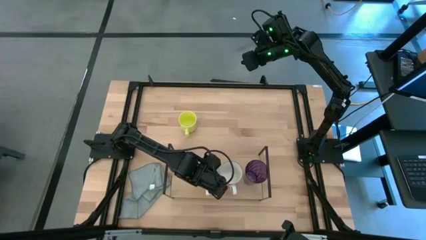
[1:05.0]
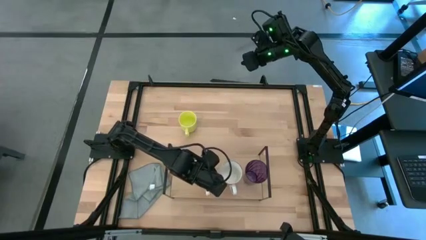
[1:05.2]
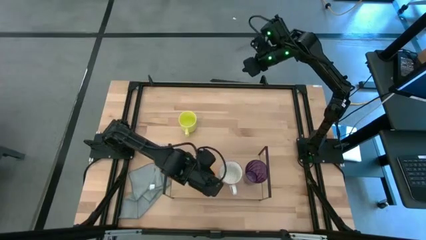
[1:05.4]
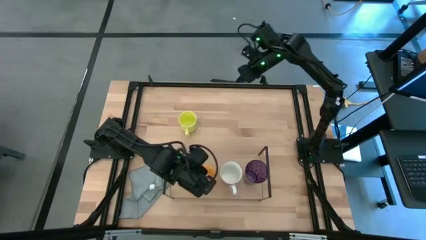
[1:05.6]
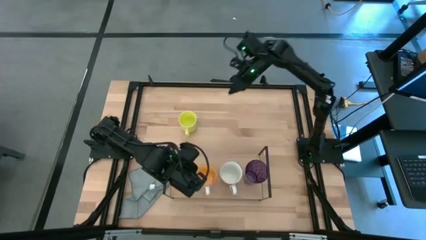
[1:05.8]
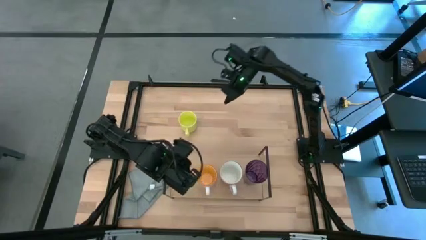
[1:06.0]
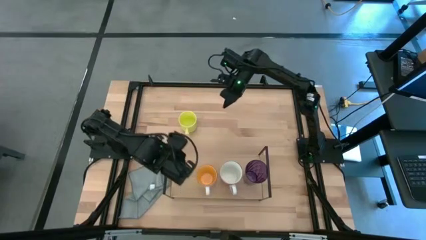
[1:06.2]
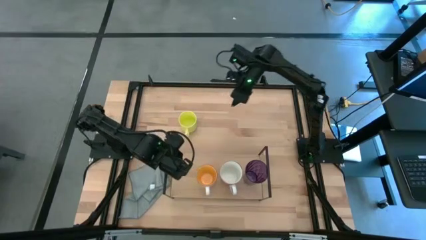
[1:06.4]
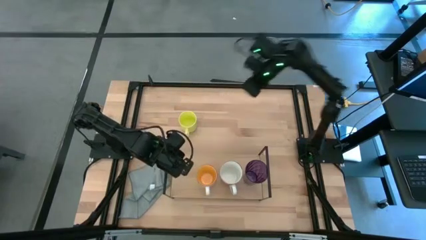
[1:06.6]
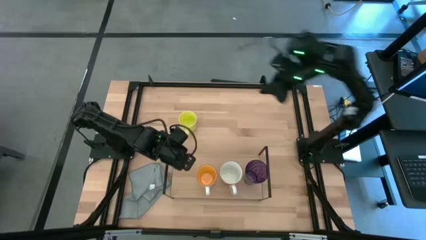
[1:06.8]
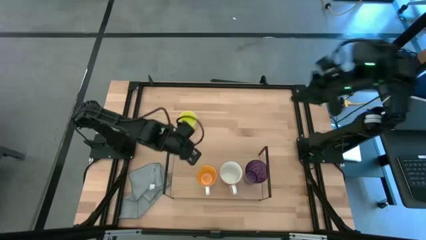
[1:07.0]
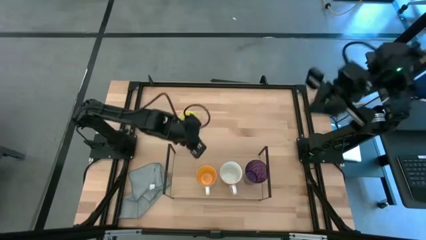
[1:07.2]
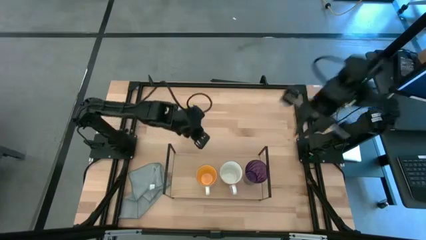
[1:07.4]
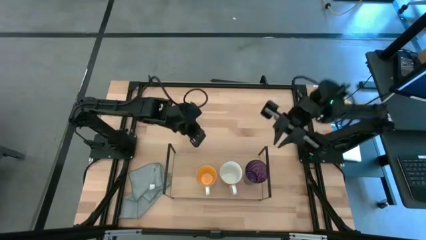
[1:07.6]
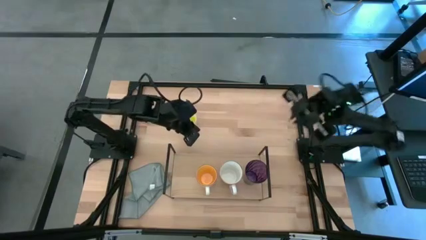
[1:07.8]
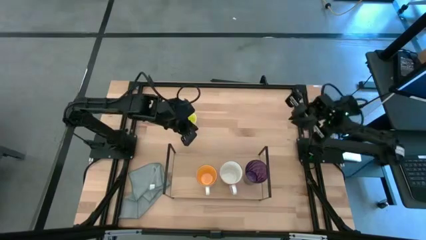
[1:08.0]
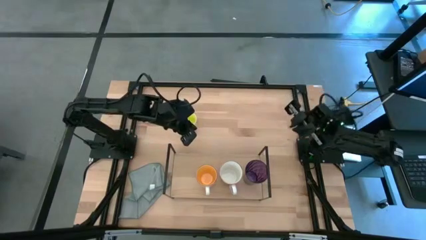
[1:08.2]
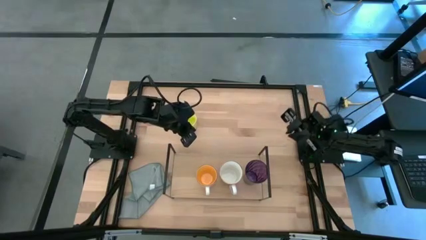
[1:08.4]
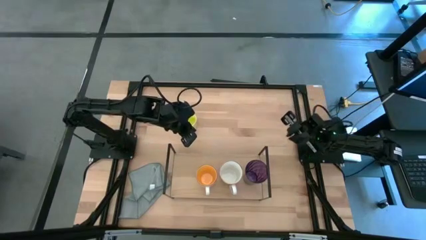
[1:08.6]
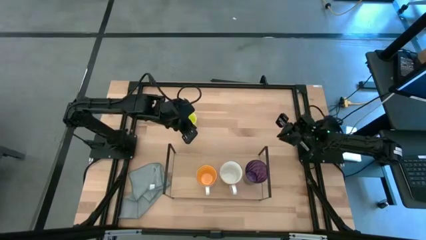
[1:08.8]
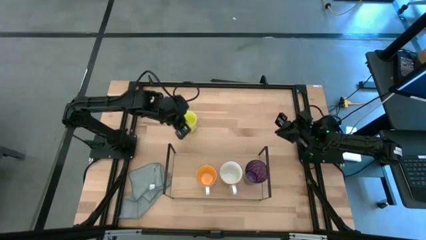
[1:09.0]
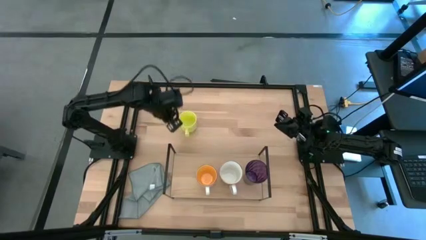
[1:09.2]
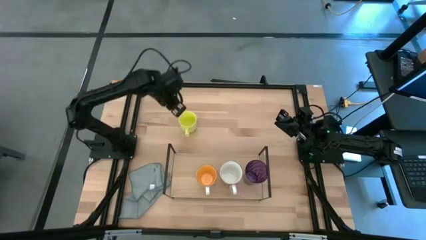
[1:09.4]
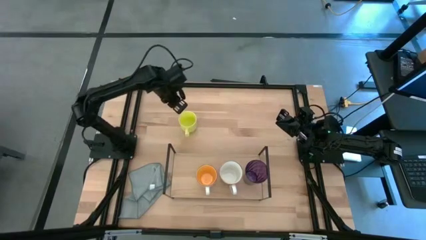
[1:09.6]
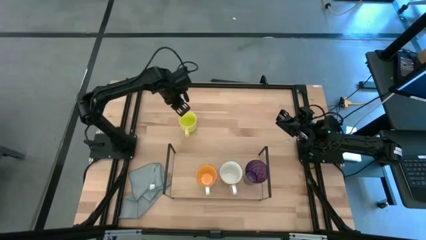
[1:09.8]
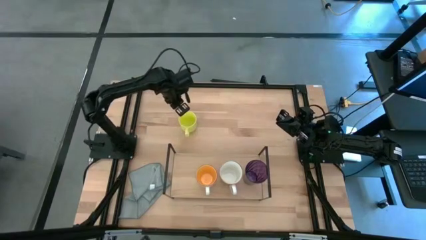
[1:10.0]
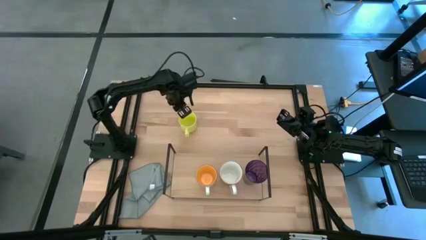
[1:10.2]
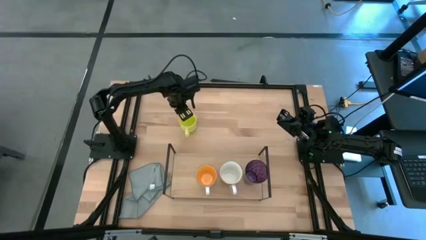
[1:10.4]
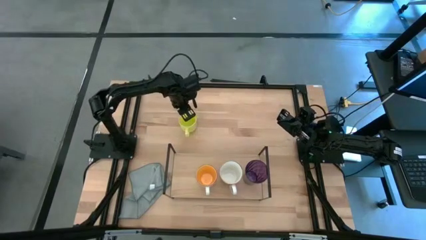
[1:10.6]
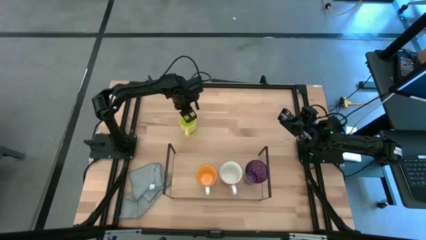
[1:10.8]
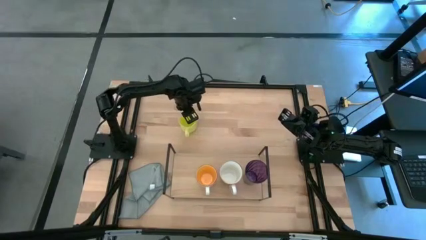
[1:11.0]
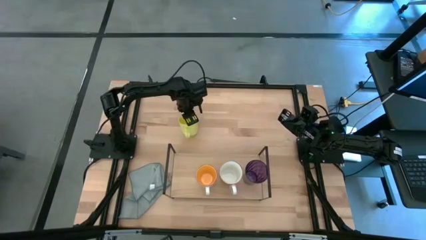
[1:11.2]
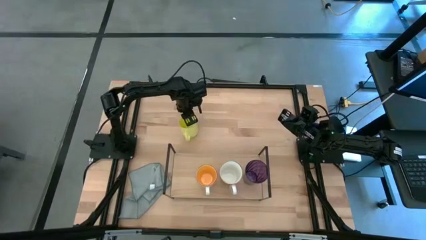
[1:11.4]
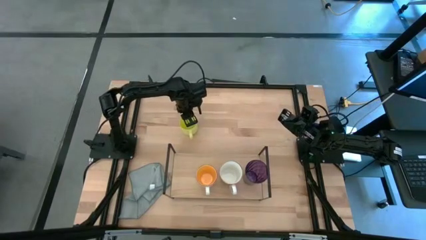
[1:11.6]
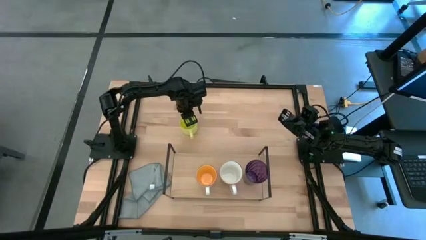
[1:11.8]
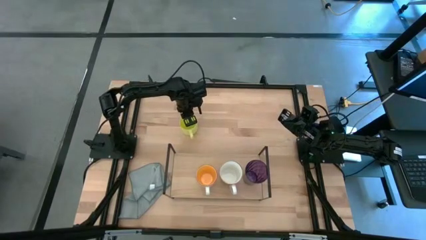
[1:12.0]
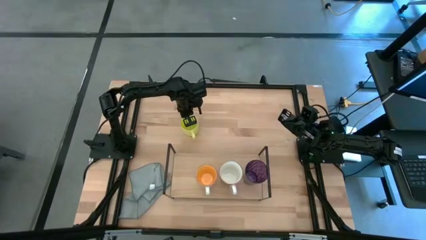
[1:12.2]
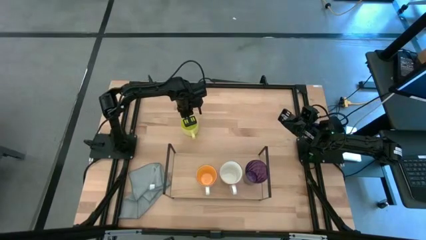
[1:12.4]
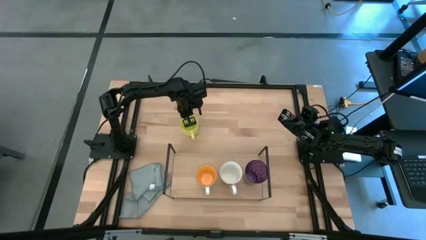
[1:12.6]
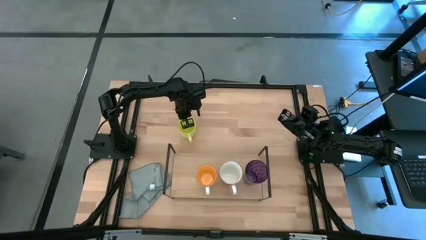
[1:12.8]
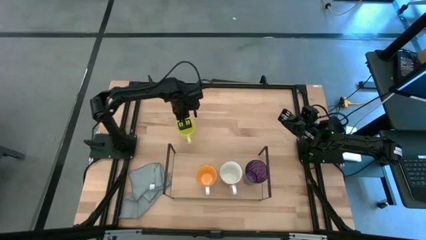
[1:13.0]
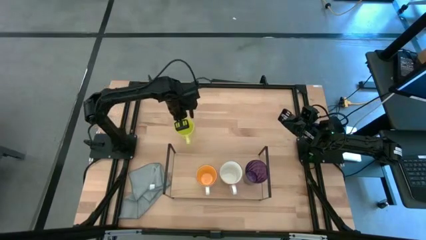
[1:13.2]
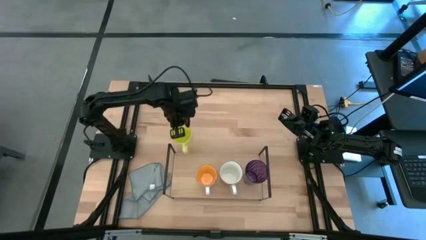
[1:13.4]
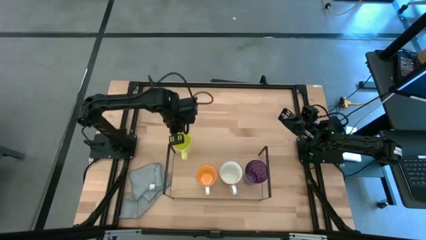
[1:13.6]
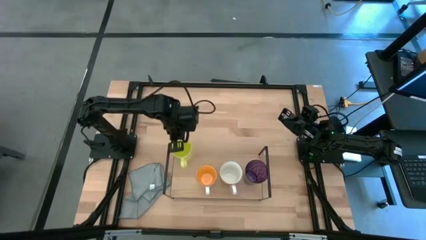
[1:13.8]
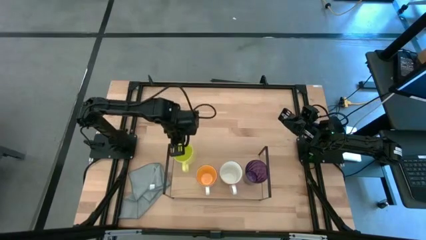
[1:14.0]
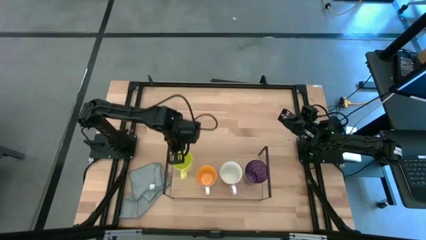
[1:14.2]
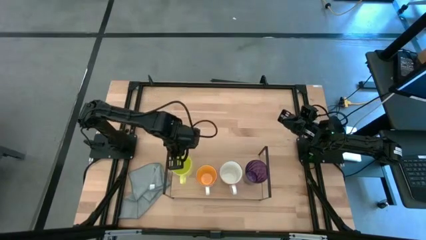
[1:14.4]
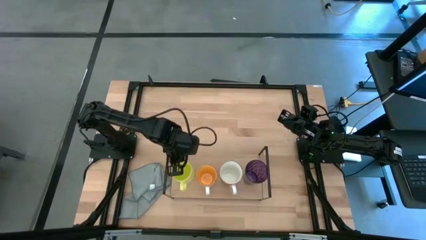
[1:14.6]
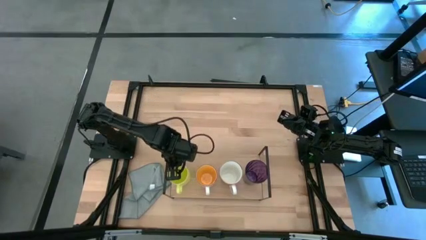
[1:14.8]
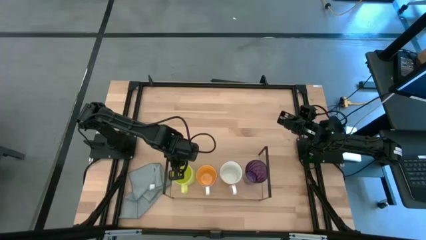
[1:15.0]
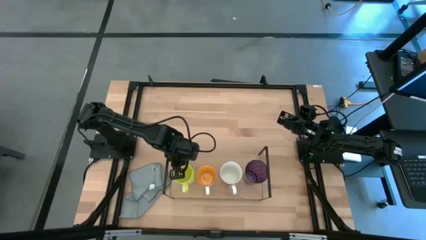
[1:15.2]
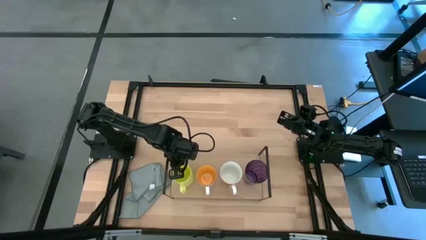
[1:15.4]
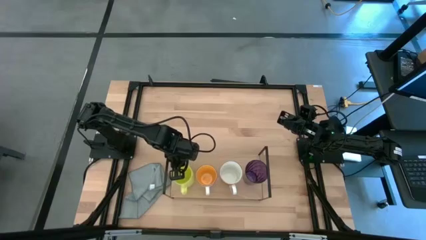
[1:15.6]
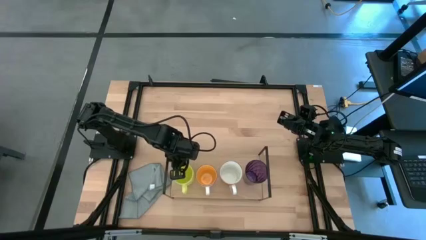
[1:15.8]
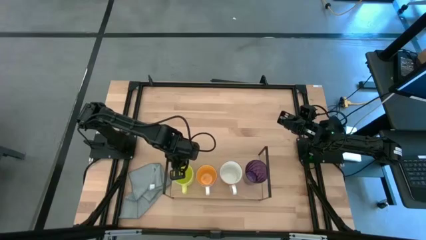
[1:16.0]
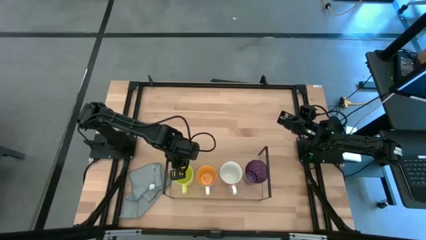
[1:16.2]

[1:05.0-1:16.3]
Task: Stack small to large cups/mugs on shelf
Put the yellow mug on the shelf

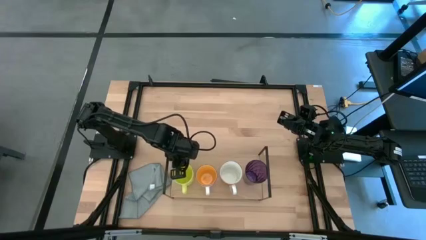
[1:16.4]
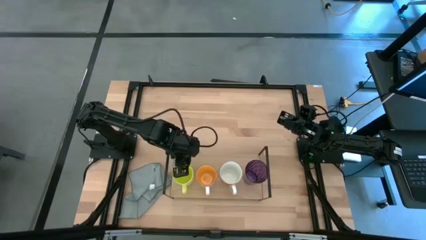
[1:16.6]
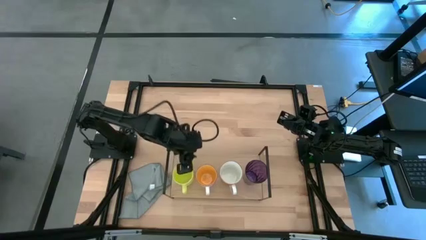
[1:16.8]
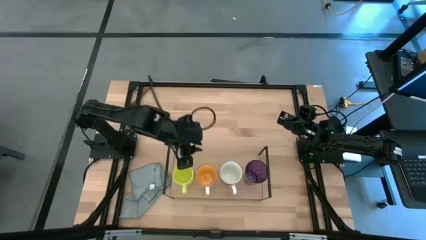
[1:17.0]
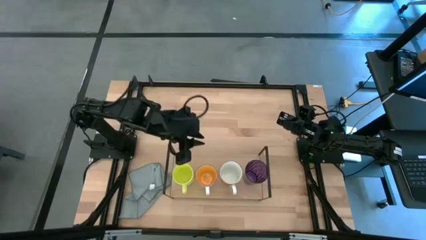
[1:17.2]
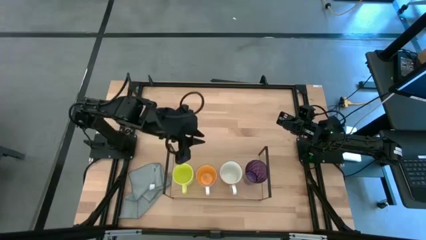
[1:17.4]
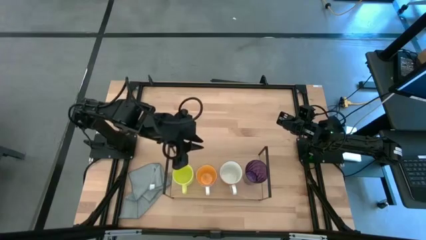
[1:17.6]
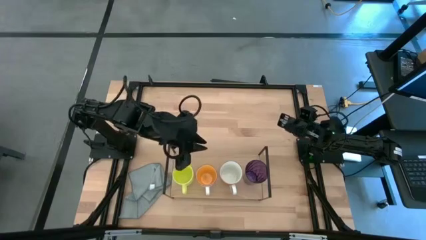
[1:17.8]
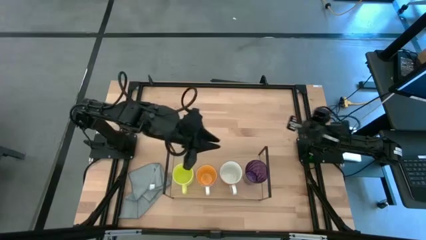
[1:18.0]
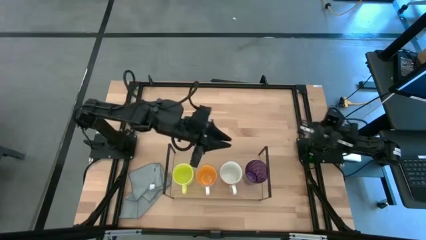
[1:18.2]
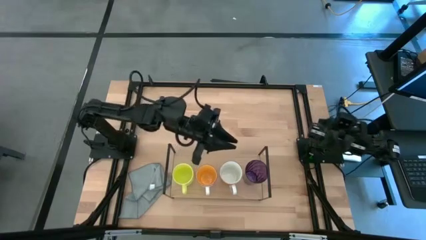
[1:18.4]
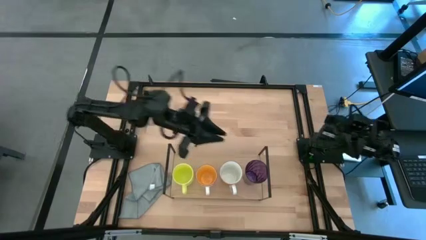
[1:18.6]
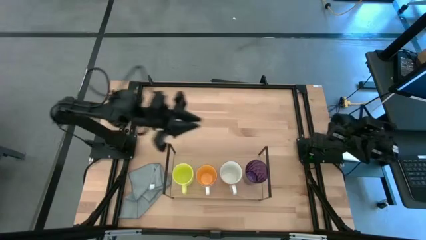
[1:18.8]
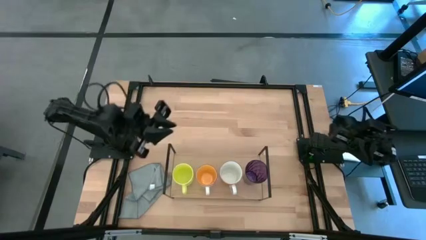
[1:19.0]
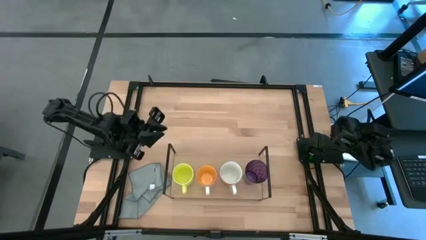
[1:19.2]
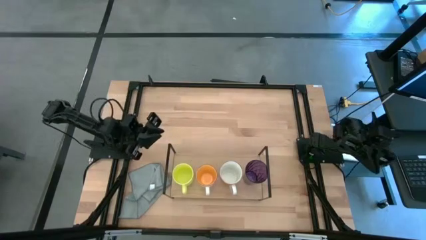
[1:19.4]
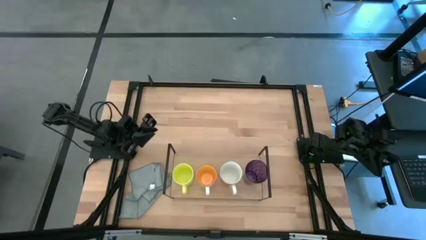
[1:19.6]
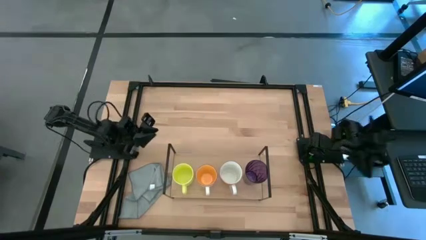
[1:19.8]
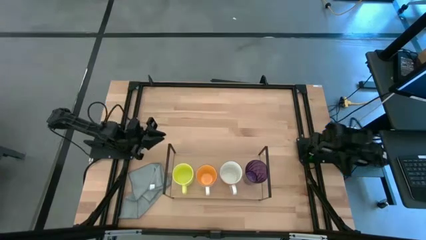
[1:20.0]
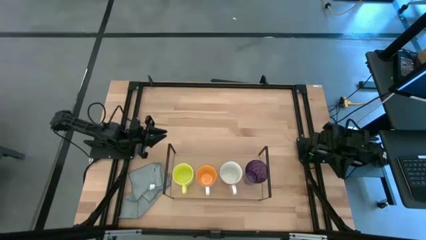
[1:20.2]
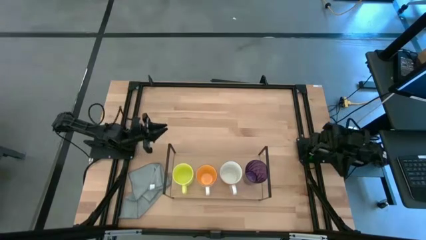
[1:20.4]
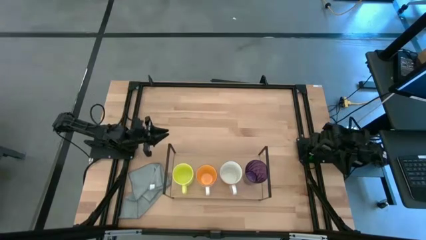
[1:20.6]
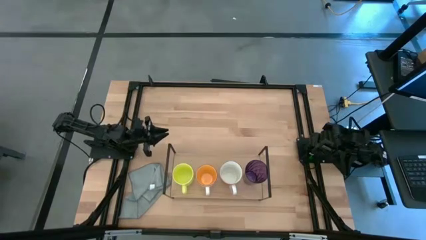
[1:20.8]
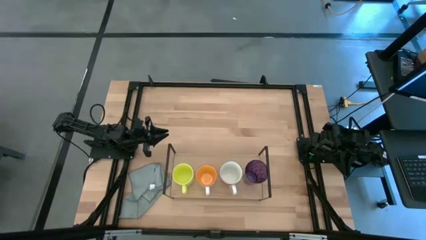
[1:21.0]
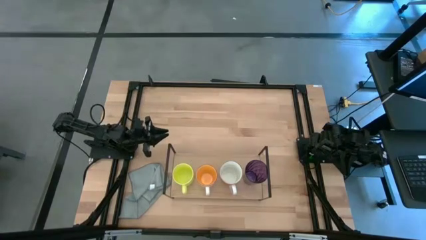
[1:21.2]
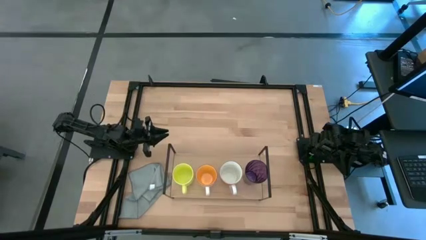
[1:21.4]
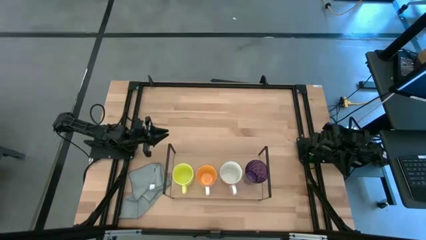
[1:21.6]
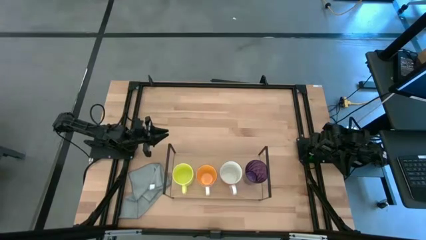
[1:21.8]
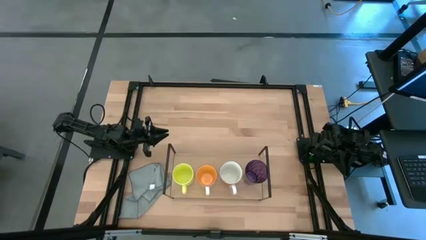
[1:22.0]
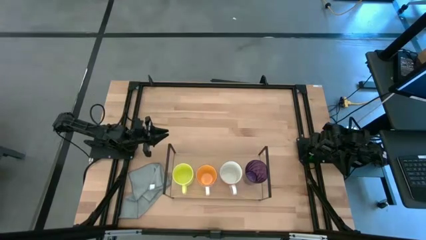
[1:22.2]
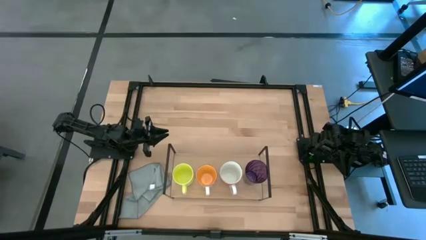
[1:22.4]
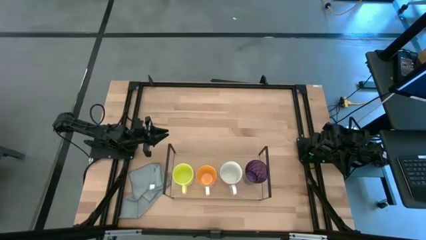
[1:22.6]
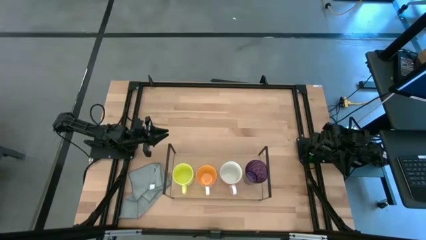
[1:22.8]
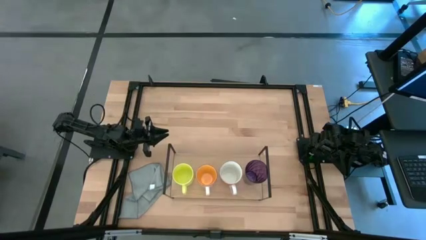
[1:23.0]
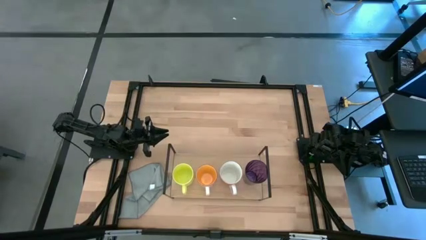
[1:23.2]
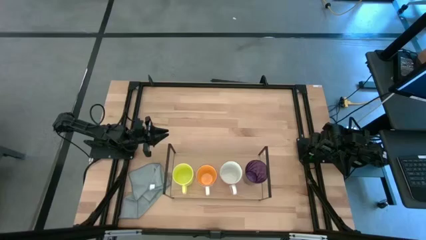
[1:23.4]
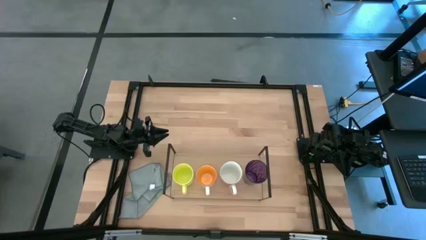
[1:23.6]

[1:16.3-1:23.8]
Return to Home Position
